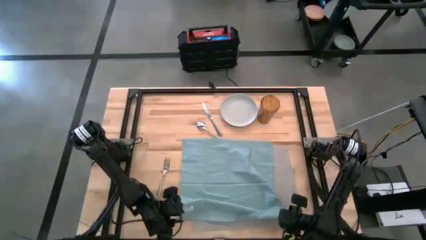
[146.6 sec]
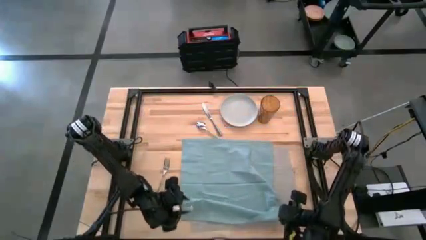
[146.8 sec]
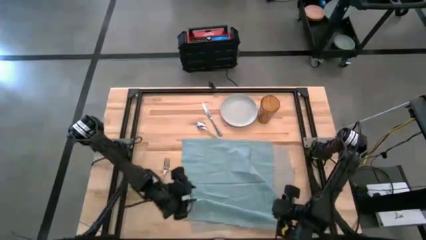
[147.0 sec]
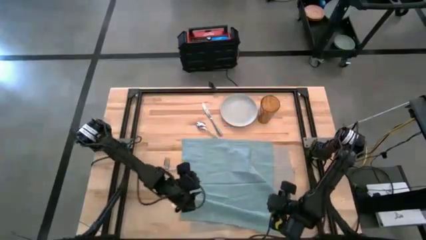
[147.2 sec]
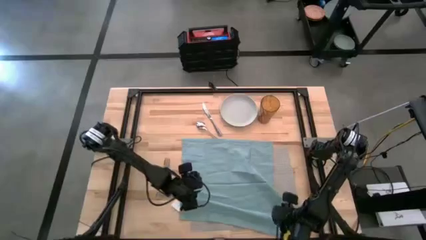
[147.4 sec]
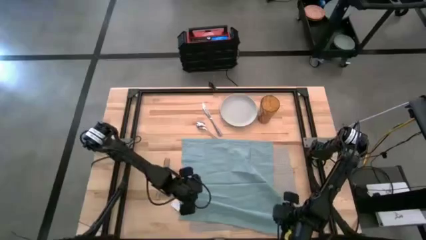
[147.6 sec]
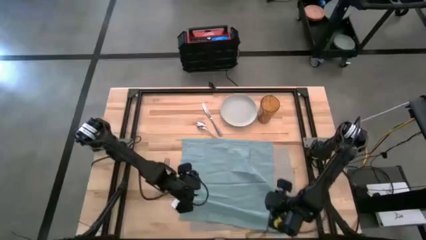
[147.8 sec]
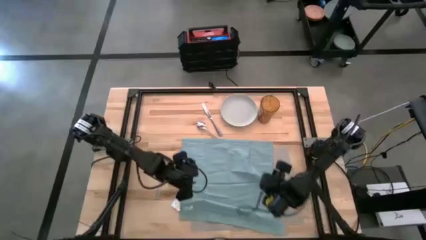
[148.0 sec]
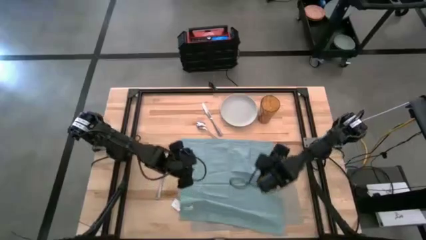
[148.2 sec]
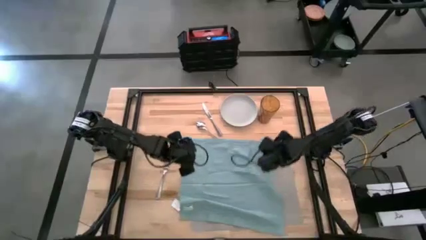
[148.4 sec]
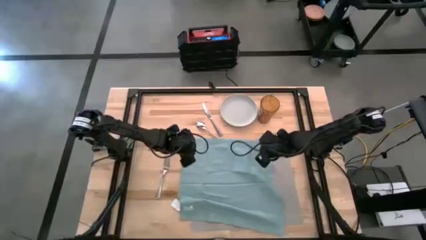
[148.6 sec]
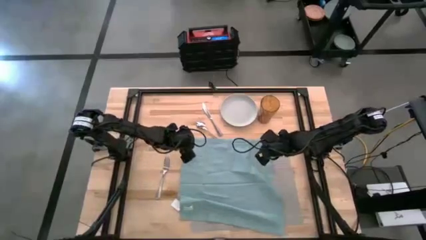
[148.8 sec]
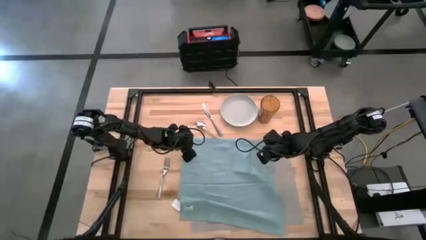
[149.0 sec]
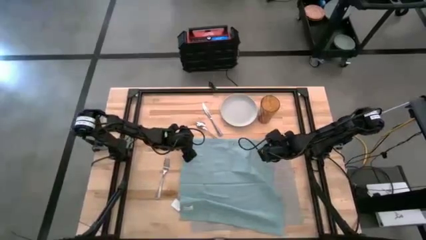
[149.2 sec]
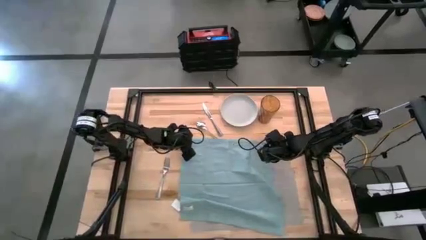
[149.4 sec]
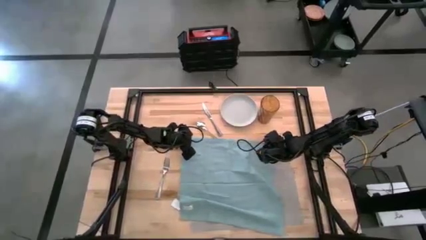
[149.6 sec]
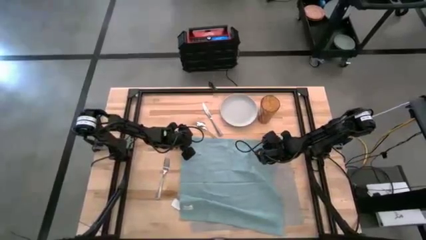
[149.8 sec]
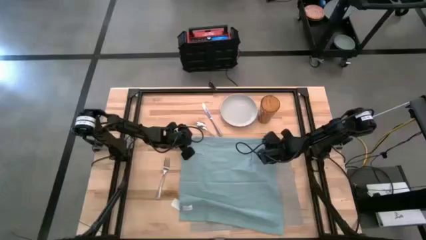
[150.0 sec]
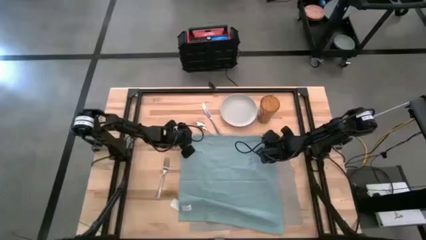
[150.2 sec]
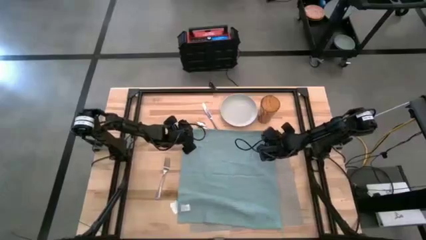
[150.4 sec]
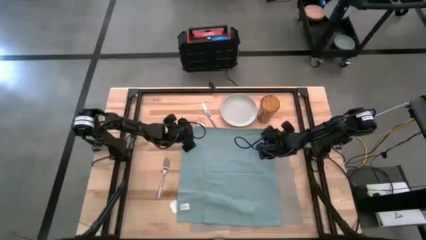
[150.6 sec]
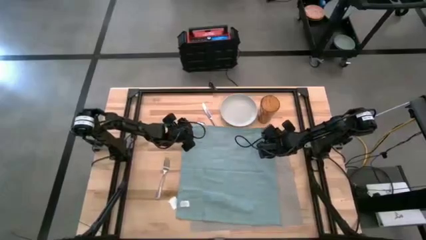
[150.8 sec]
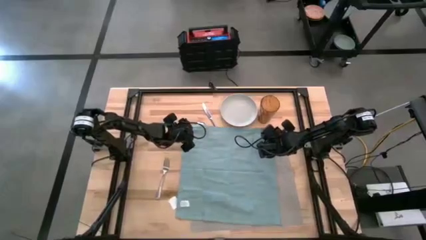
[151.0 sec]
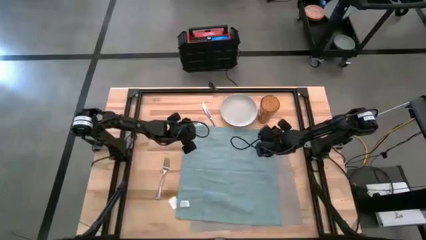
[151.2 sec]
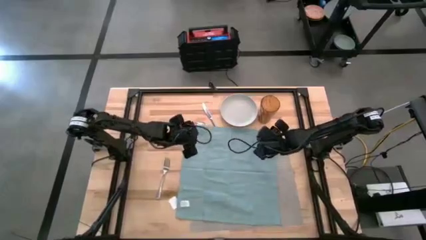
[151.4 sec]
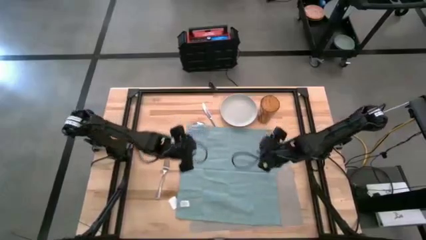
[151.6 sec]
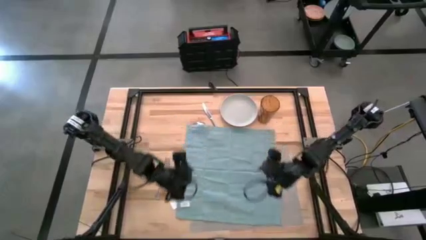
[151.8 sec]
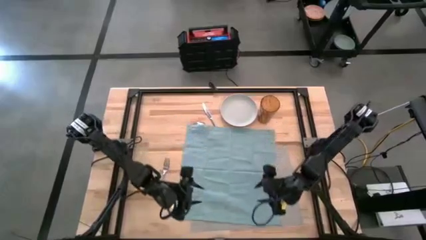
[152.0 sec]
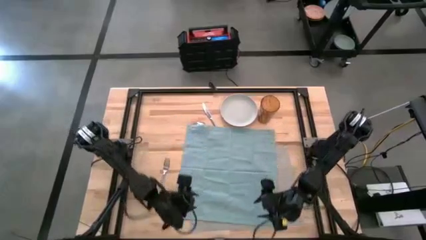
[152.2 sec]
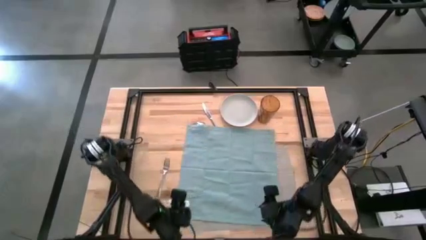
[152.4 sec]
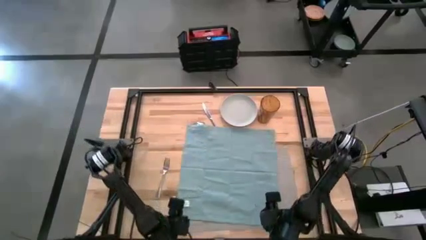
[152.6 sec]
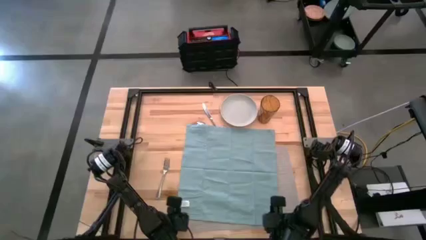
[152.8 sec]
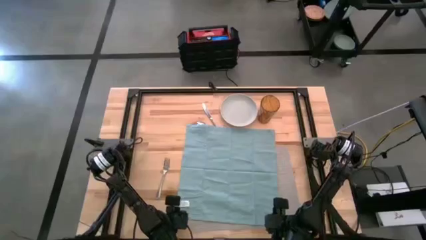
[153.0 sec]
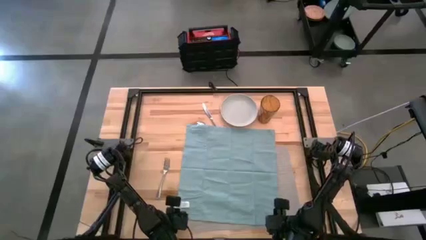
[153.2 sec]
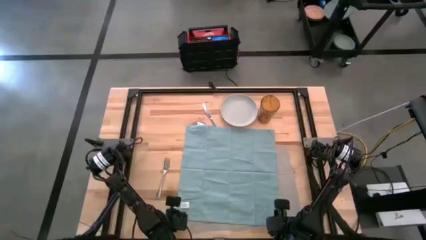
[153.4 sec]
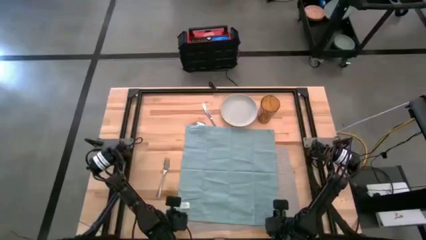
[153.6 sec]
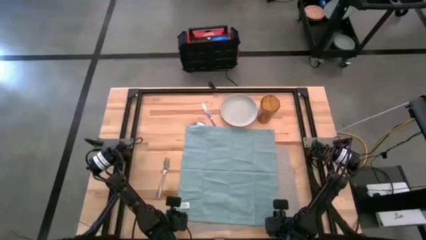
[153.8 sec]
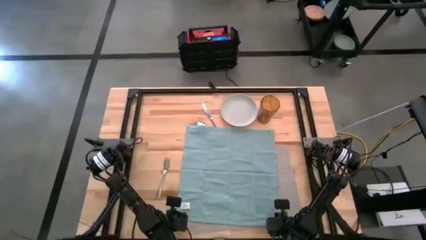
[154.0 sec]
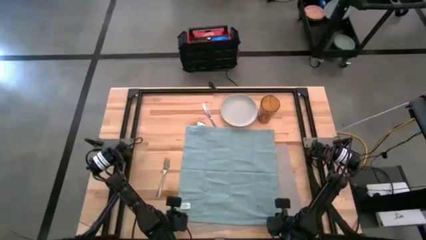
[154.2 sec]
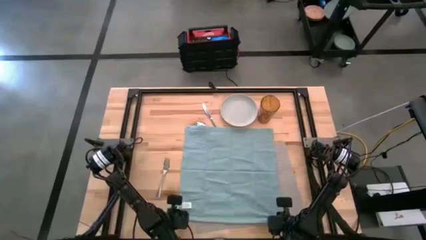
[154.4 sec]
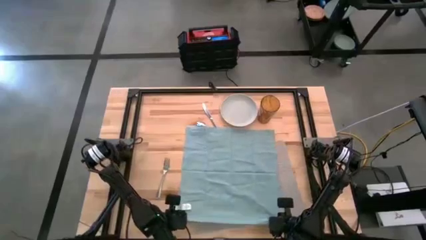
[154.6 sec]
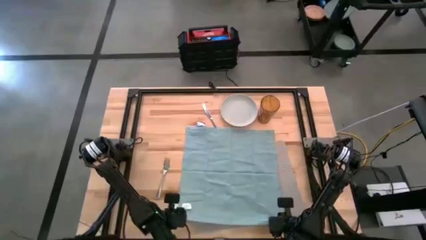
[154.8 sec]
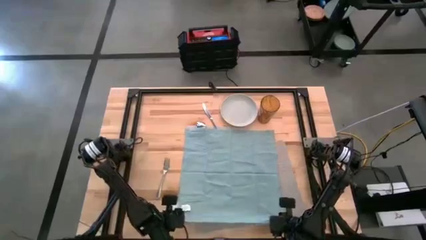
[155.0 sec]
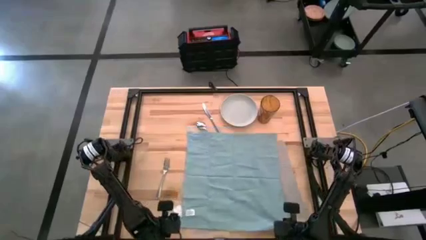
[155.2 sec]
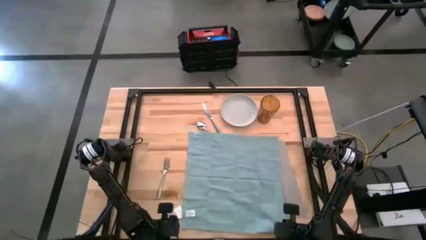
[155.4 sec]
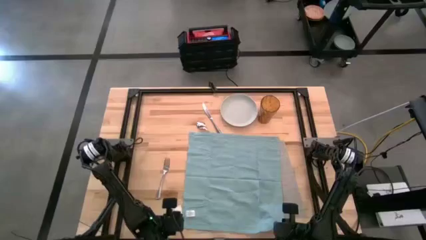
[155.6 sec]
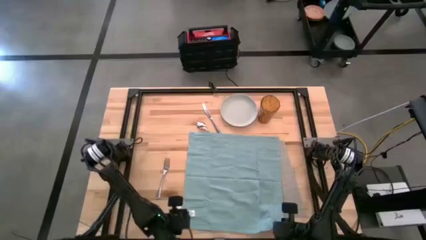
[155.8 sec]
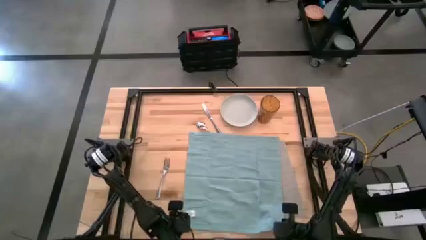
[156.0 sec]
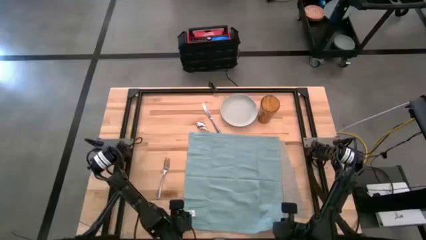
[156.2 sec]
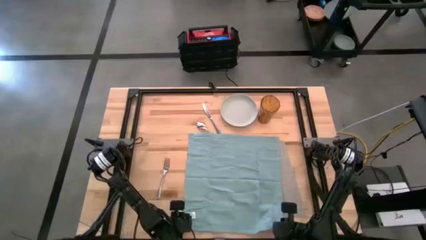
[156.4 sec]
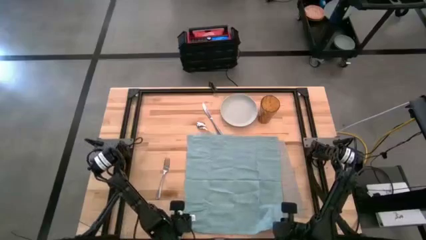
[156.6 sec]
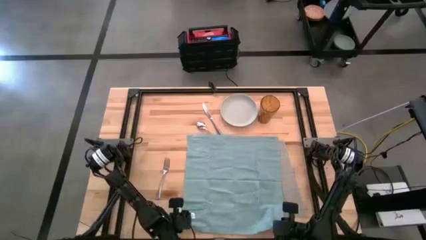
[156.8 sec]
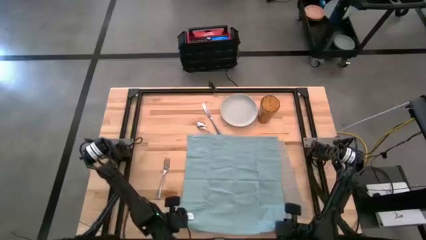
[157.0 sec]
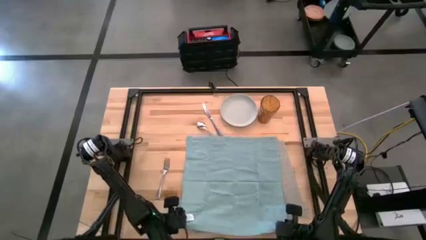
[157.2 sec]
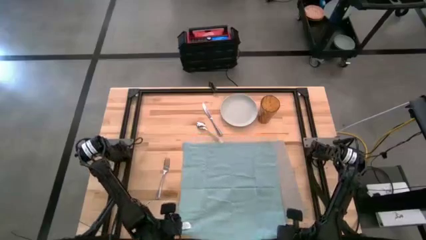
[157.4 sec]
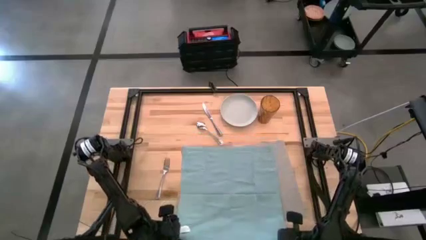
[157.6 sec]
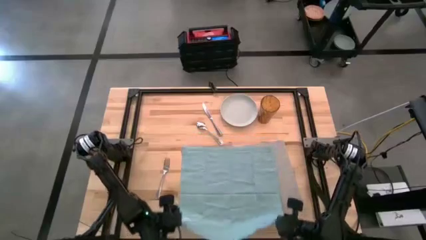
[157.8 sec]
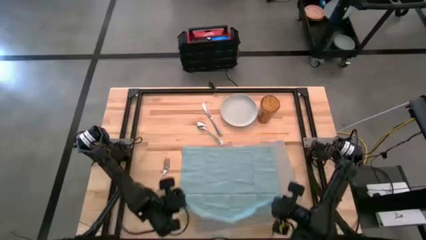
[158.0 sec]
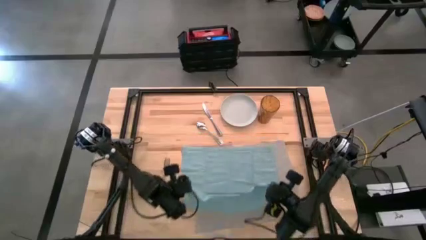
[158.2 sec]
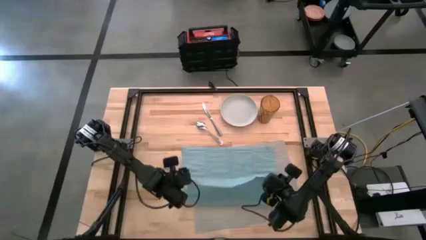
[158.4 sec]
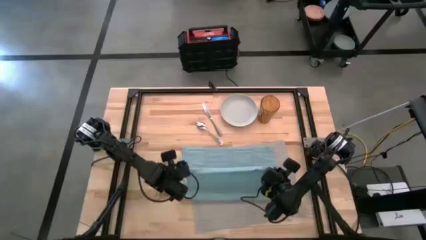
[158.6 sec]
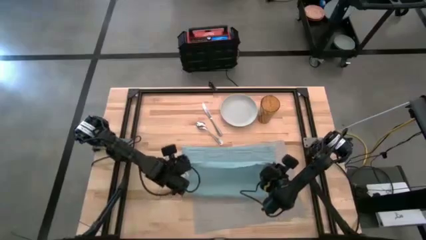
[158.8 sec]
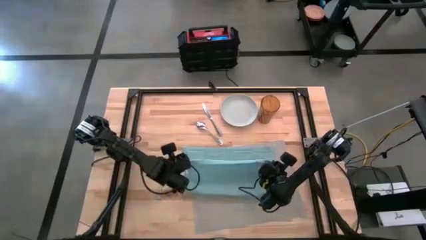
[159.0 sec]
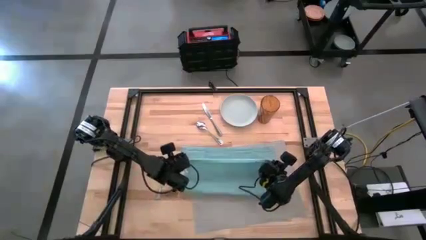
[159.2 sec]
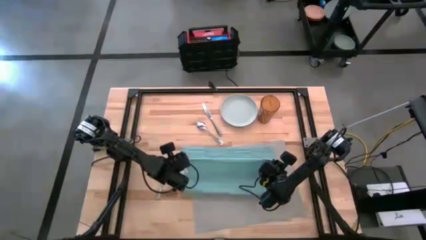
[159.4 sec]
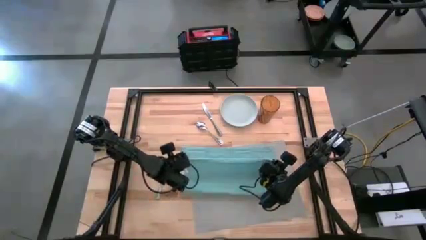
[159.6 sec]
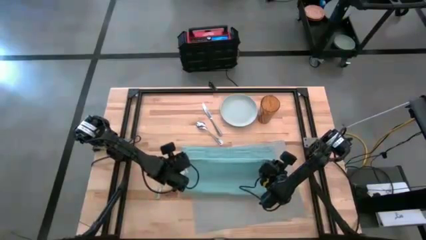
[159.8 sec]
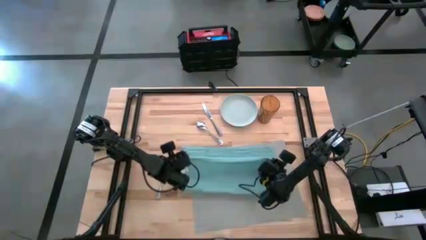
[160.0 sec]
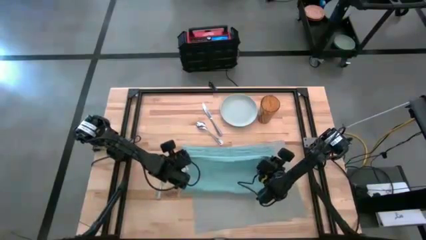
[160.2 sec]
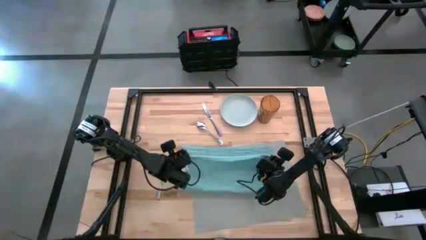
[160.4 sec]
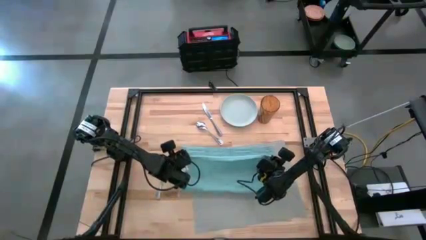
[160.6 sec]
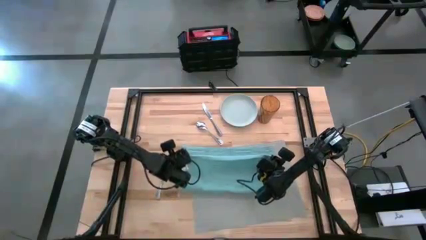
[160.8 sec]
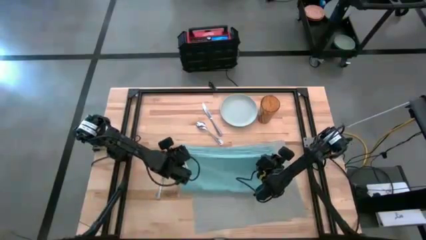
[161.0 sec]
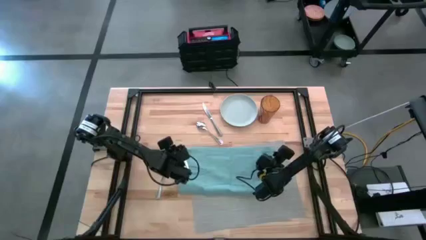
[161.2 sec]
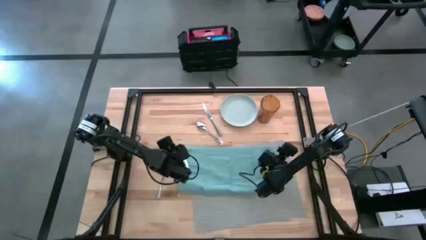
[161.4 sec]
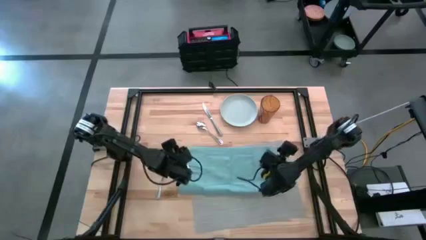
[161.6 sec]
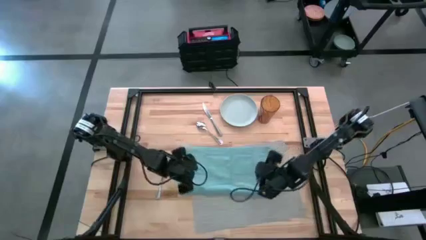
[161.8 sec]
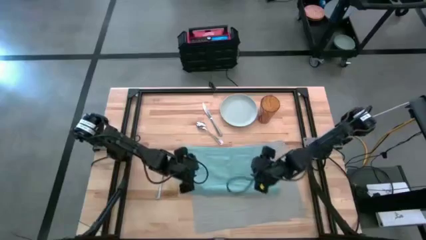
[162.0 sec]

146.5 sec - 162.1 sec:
Task: Set table place
Fold the blue napkin on the gray placemat
